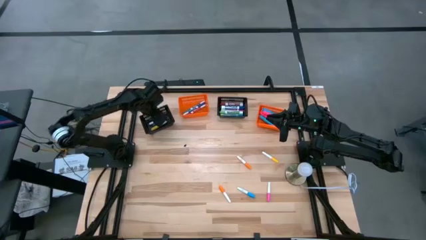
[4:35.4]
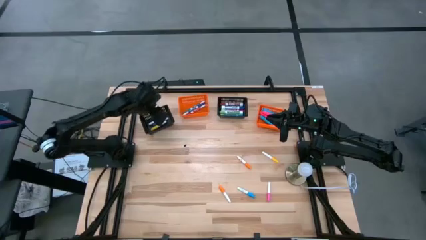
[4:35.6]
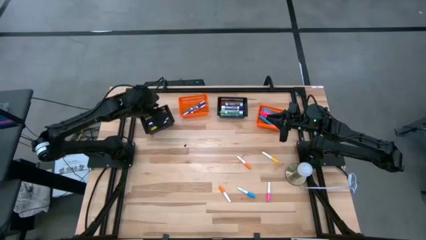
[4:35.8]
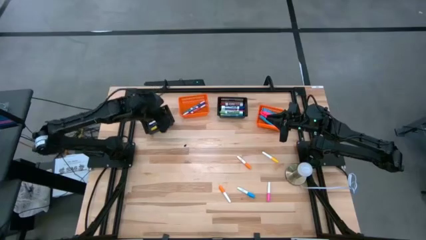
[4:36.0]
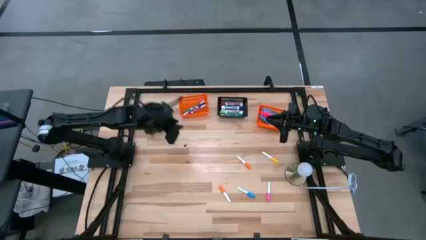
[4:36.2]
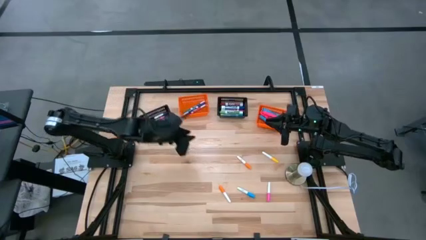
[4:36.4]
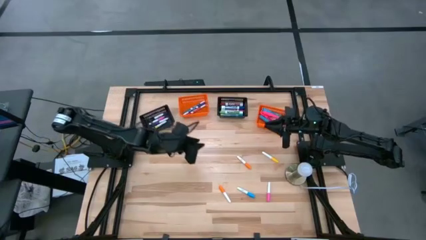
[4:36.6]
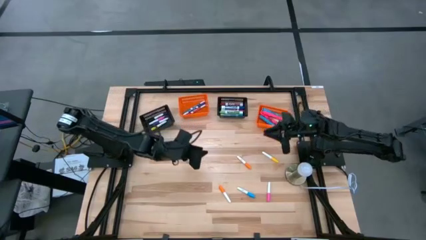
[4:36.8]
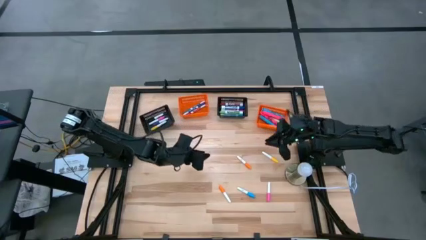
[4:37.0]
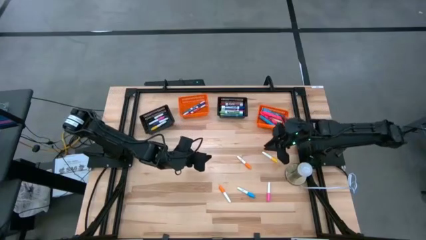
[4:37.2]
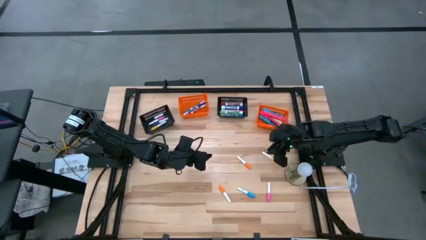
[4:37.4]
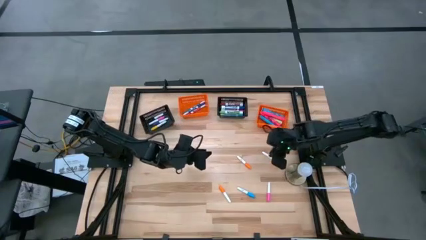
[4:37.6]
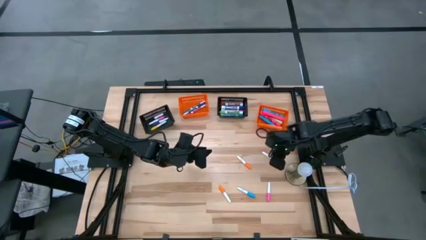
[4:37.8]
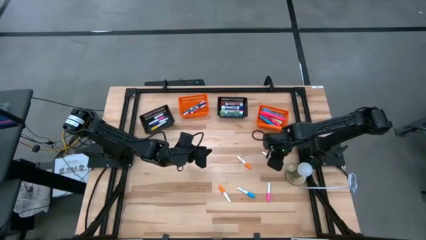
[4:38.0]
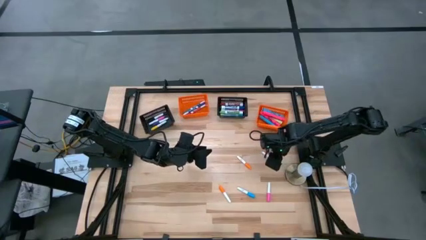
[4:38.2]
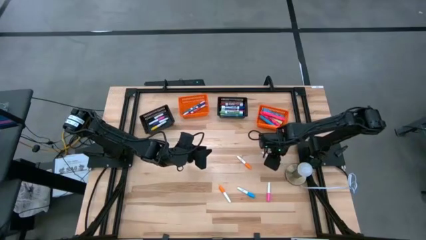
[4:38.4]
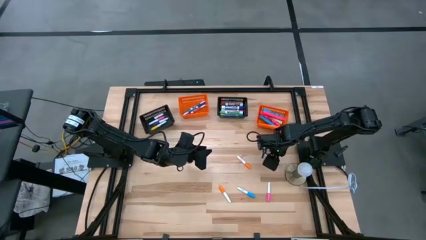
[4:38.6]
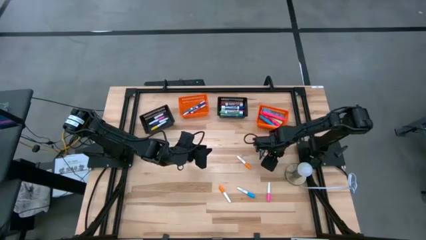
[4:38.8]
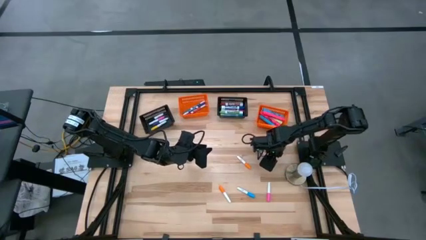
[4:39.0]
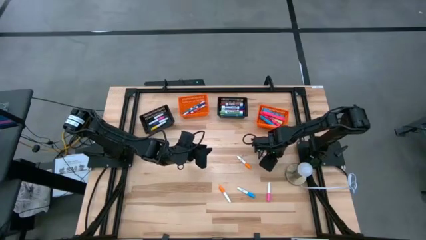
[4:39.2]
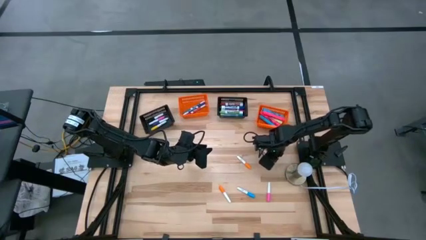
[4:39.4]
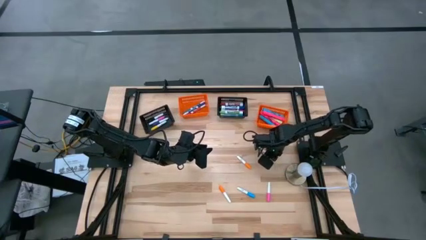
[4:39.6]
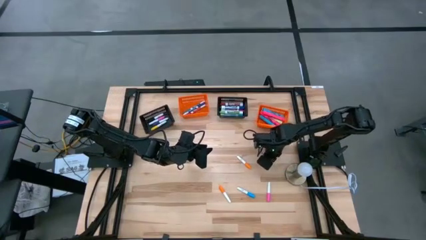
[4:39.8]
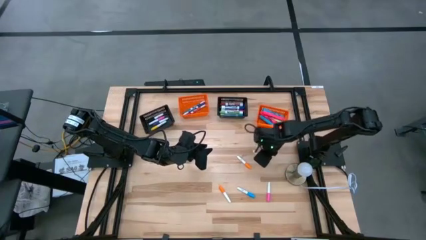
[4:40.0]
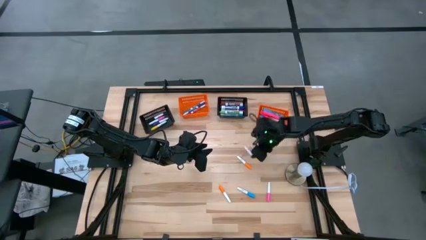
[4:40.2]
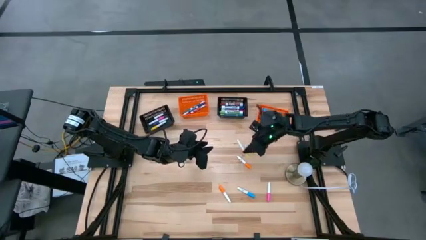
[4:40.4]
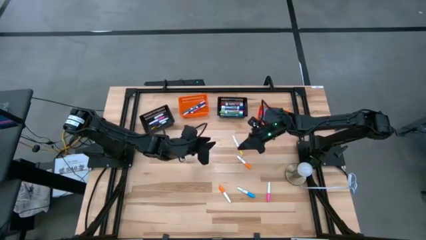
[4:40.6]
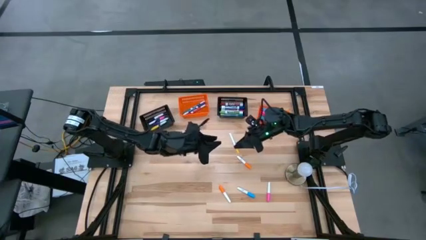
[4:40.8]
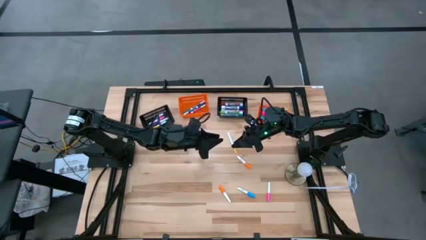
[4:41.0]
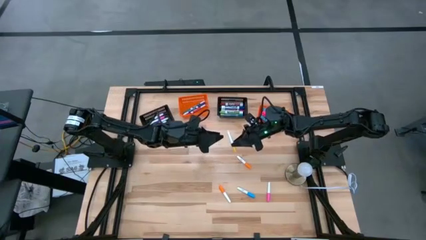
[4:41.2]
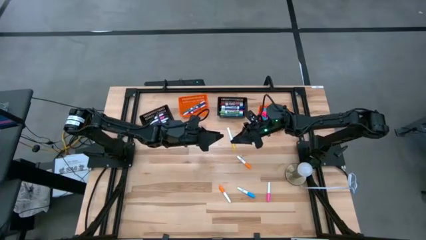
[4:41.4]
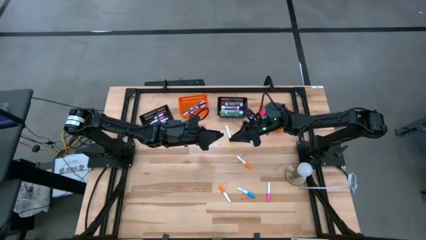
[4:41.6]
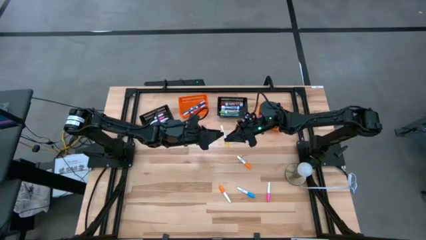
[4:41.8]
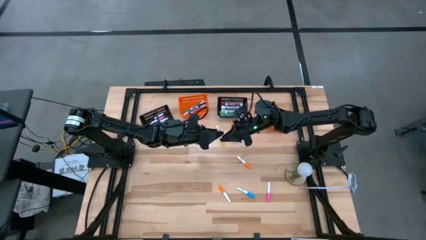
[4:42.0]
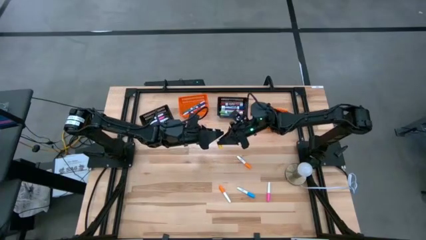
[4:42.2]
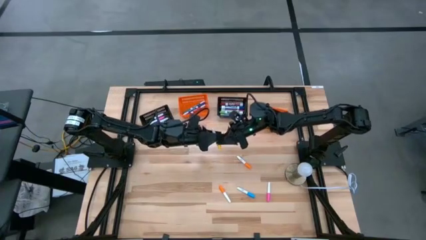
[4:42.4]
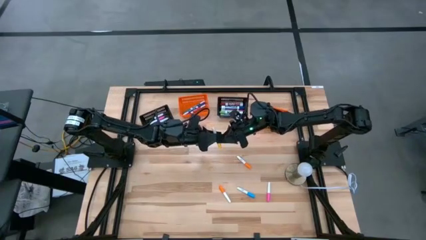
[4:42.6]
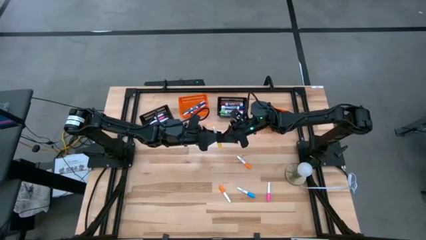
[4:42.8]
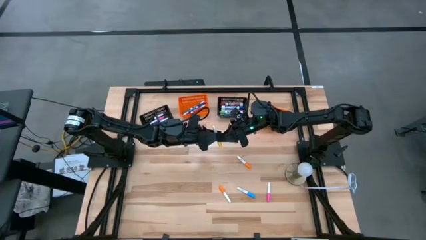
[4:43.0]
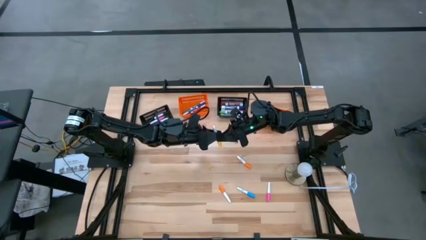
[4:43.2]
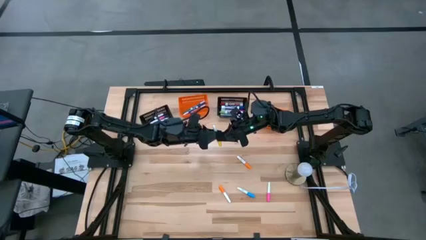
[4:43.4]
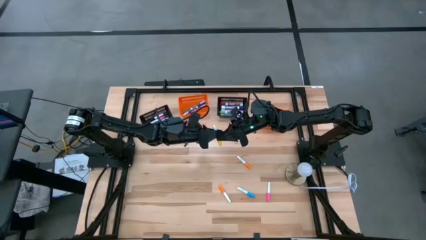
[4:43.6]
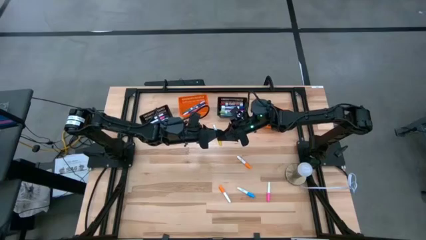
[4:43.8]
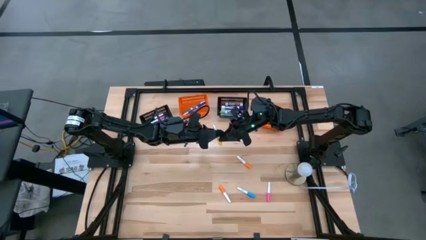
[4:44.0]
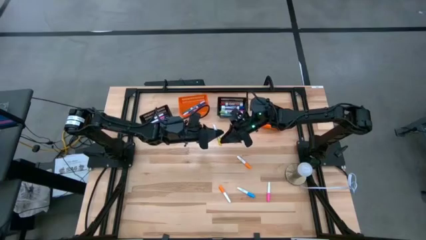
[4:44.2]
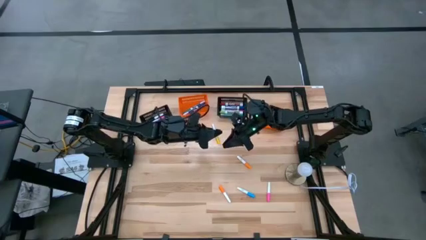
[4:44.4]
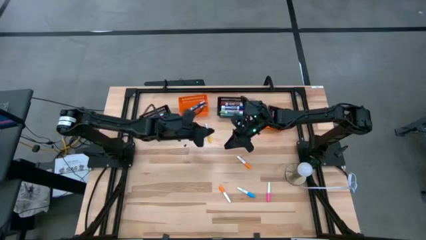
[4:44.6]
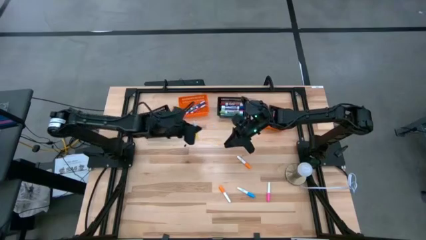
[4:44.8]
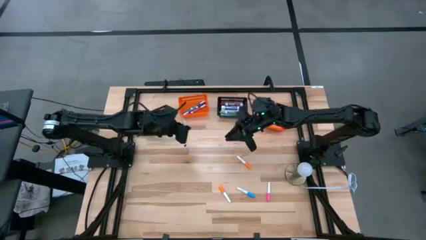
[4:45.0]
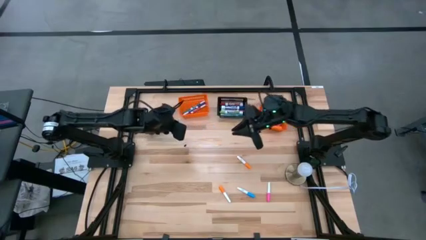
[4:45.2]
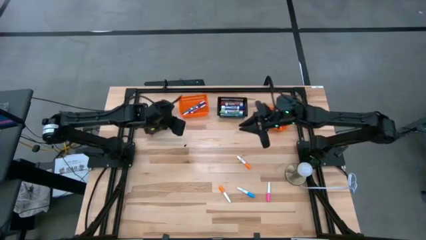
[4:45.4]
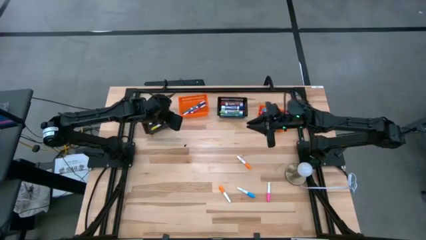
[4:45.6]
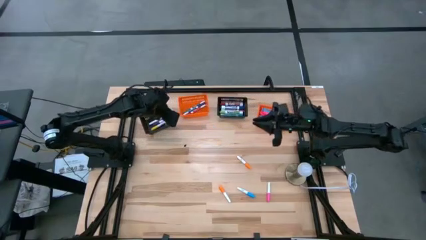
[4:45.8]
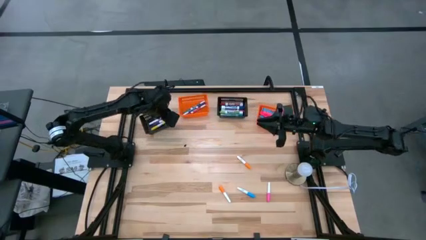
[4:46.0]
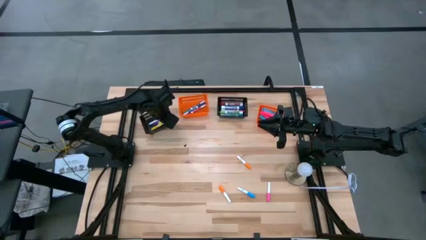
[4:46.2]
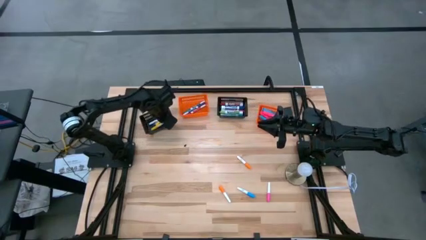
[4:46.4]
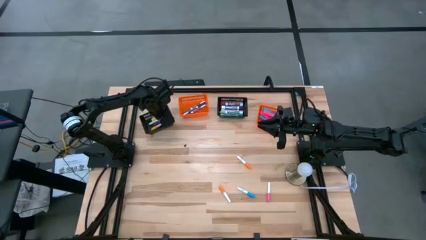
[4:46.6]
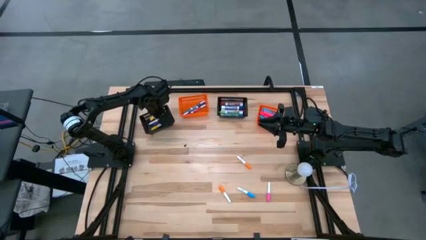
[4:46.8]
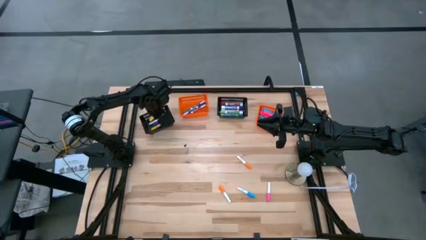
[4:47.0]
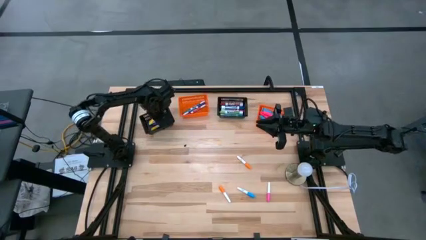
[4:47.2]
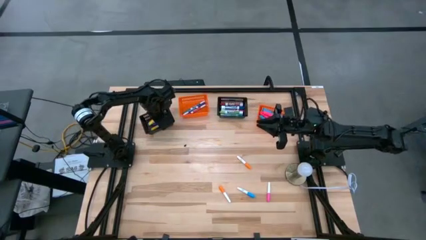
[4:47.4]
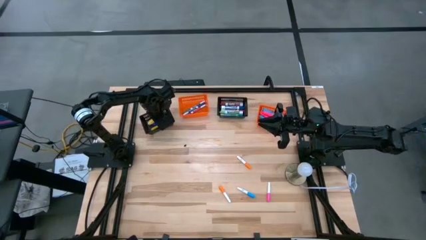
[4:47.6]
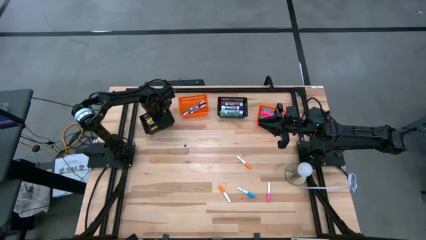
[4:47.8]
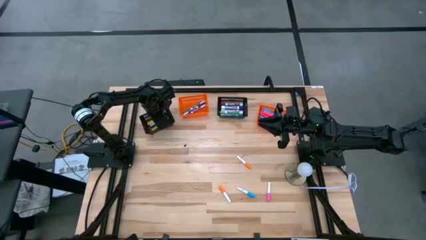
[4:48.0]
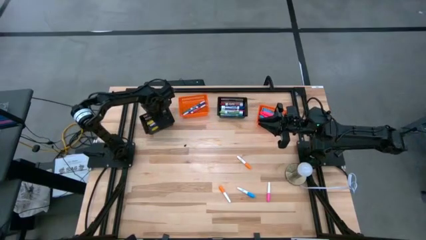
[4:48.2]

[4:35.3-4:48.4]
Task: Pick & Place Markers
Put the white yellow marker into the left black bin

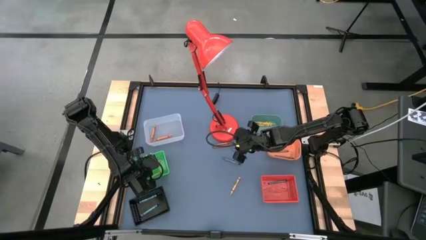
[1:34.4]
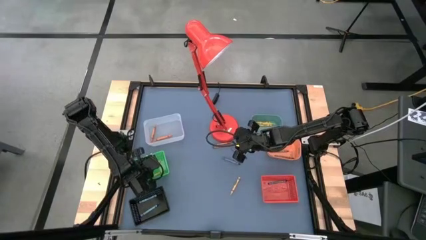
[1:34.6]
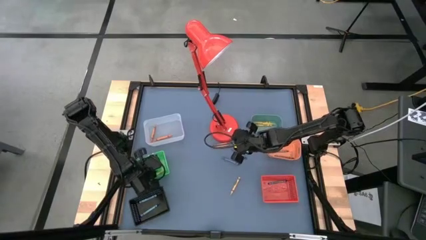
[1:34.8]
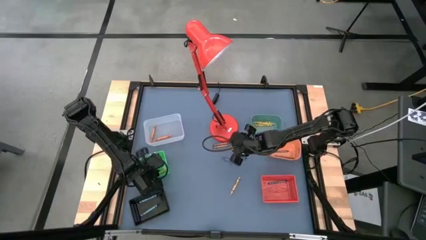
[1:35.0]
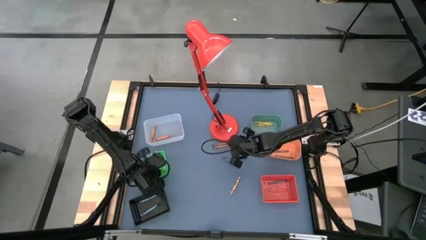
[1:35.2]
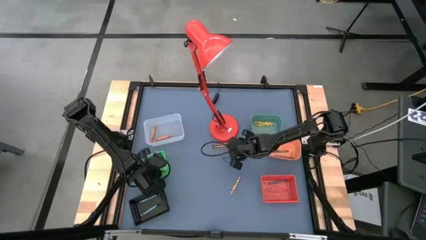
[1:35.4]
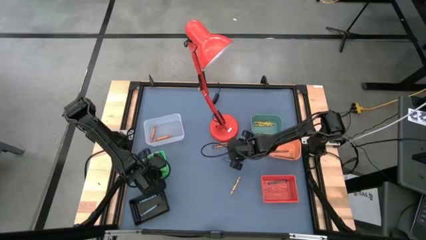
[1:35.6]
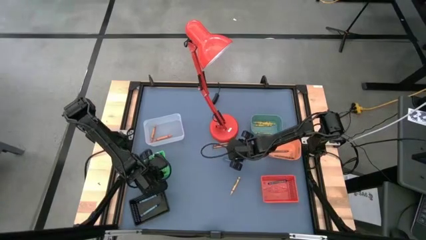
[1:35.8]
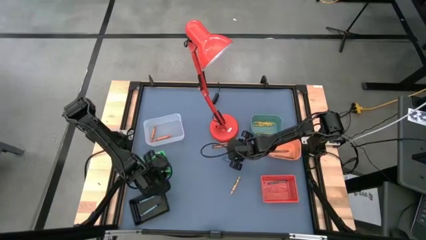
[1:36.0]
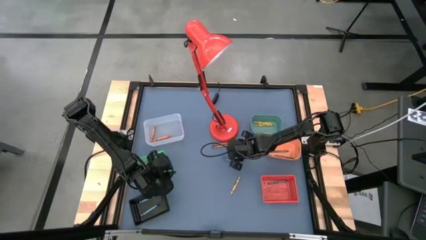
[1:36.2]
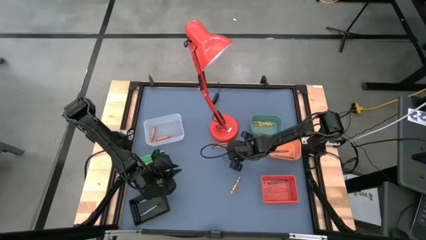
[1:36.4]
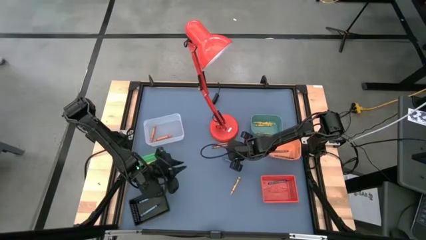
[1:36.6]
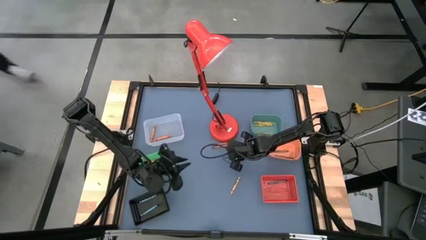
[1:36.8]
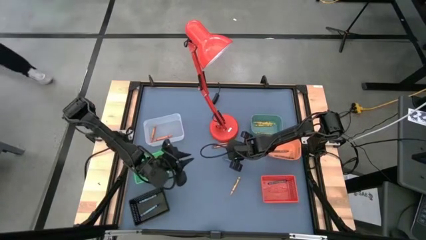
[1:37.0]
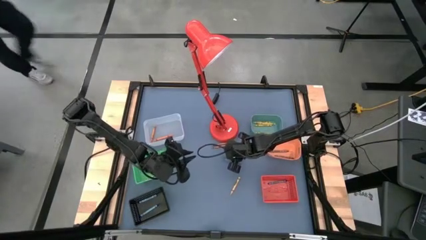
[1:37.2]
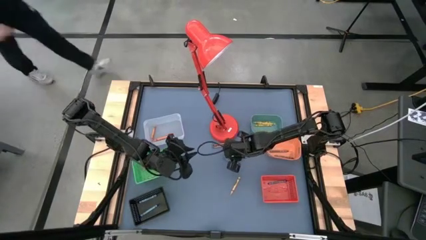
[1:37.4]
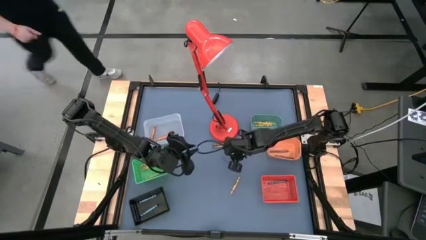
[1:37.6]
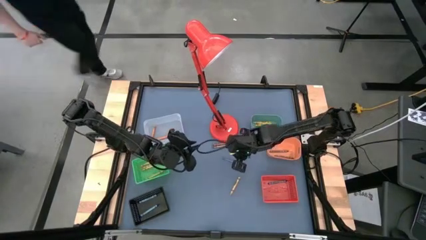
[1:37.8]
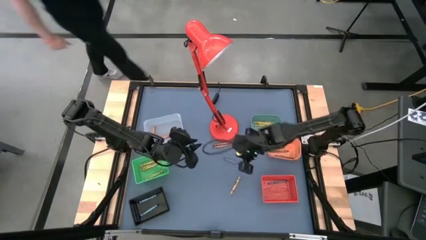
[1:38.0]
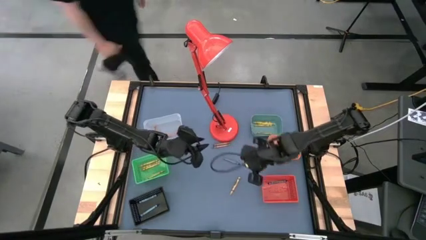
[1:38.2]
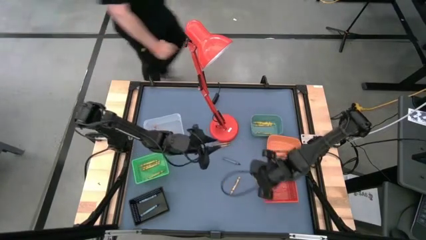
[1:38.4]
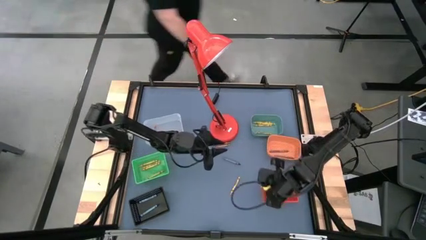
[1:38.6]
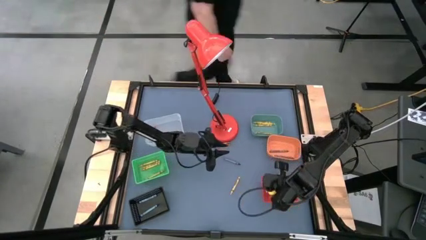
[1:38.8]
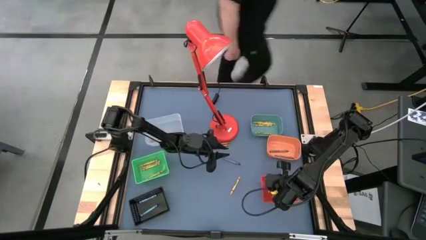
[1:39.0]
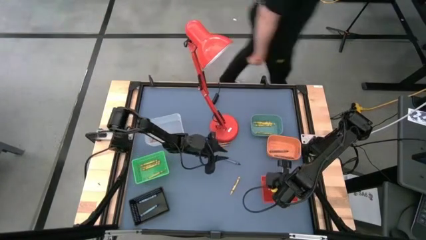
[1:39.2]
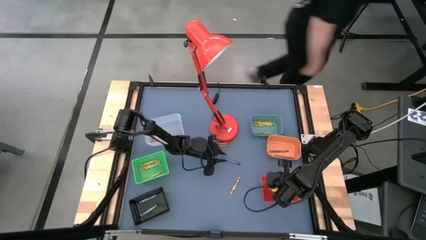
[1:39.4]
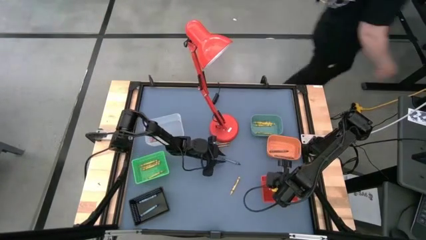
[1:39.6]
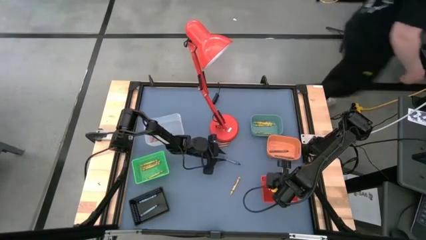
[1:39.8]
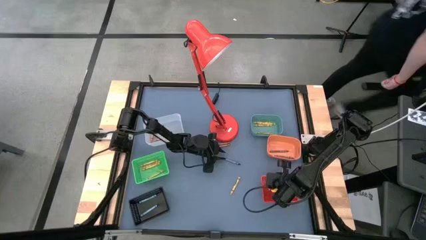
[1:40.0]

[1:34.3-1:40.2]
Task: Sort crayons
Put the dark blue crayon into the red bin
